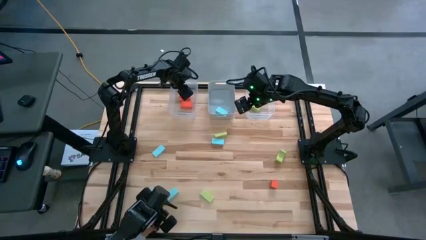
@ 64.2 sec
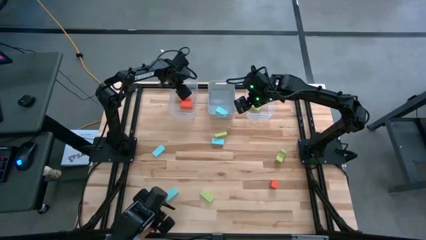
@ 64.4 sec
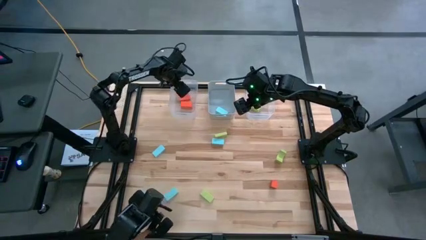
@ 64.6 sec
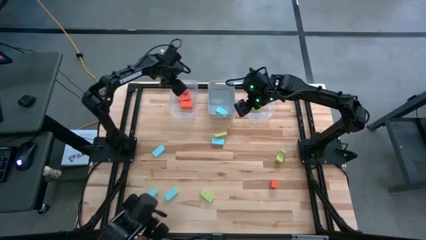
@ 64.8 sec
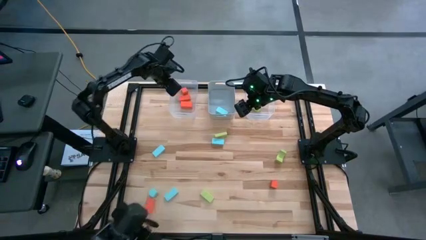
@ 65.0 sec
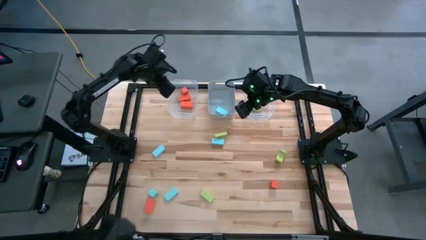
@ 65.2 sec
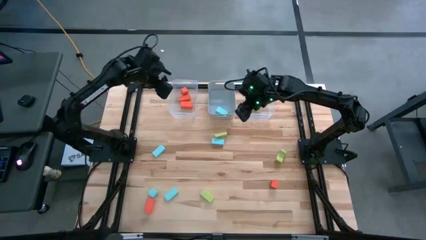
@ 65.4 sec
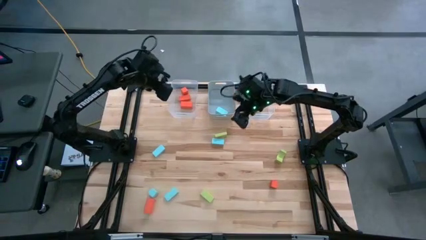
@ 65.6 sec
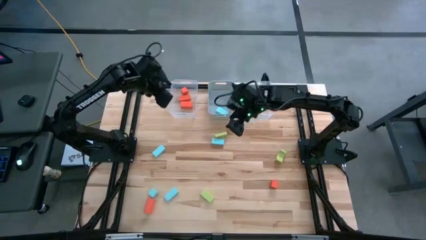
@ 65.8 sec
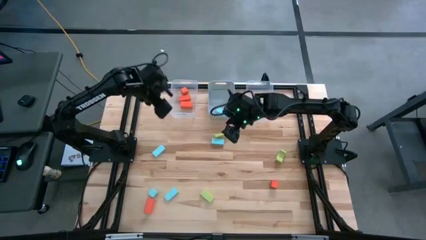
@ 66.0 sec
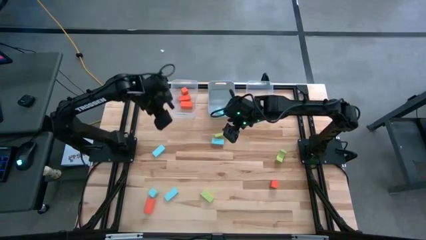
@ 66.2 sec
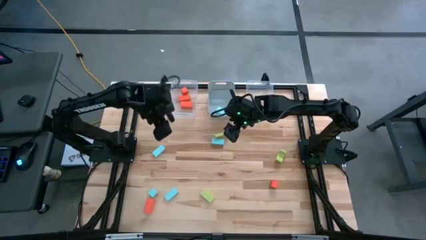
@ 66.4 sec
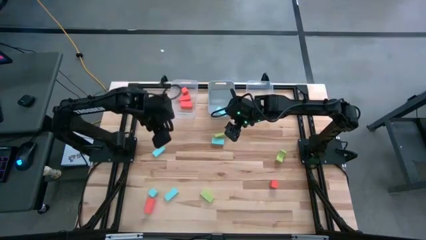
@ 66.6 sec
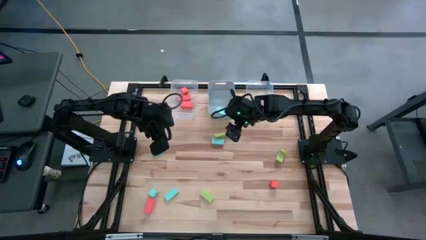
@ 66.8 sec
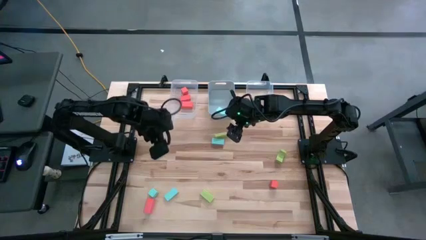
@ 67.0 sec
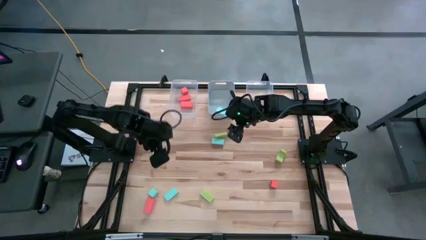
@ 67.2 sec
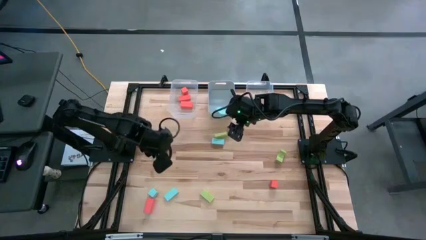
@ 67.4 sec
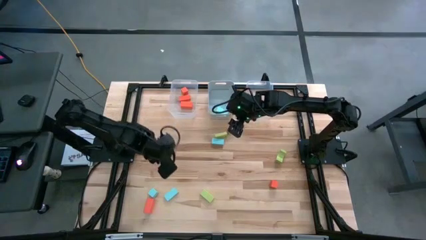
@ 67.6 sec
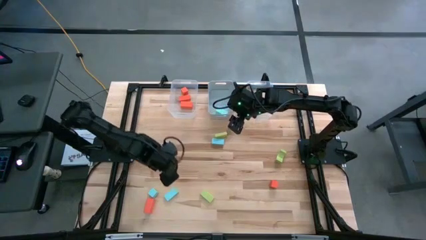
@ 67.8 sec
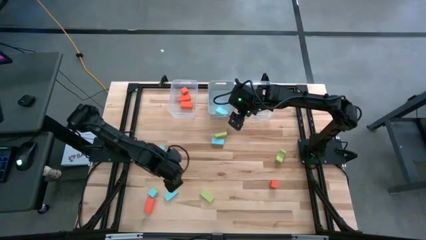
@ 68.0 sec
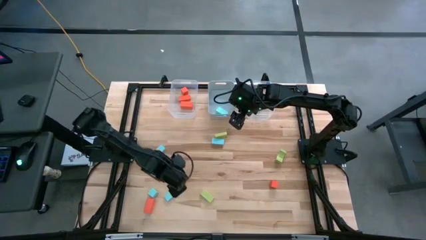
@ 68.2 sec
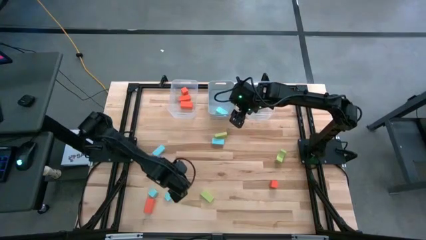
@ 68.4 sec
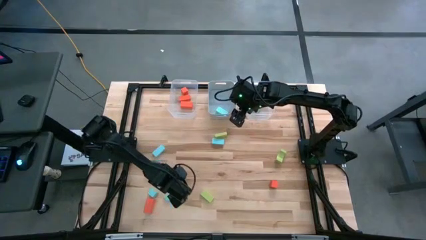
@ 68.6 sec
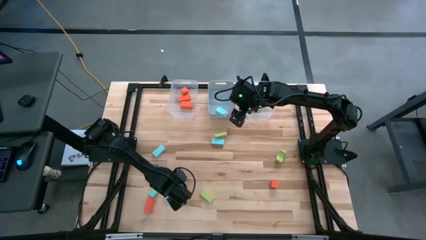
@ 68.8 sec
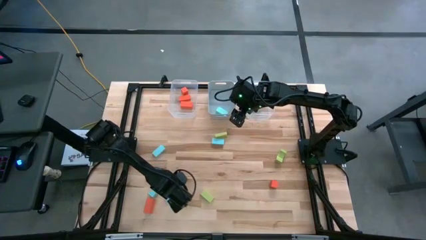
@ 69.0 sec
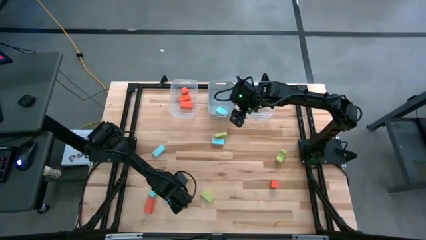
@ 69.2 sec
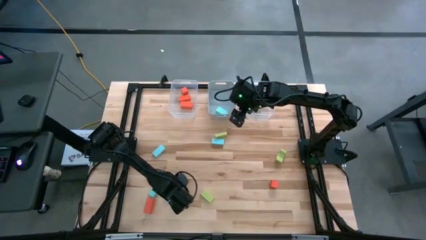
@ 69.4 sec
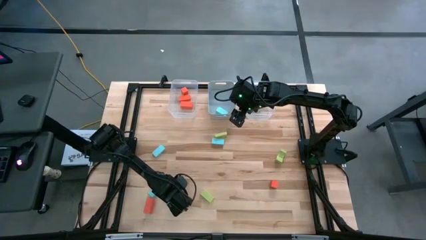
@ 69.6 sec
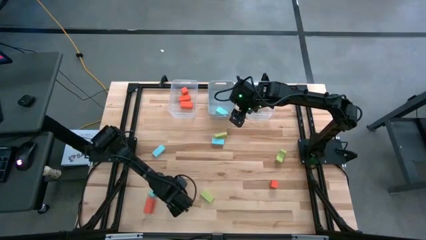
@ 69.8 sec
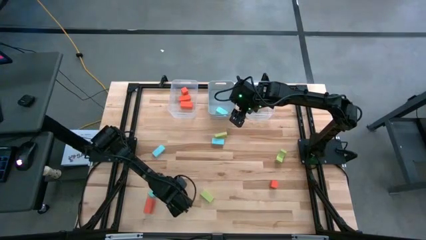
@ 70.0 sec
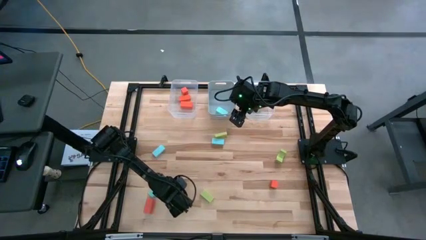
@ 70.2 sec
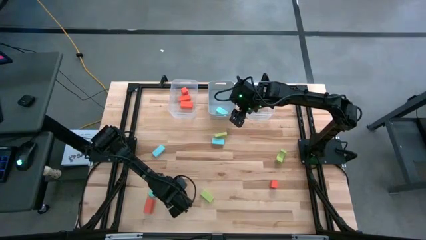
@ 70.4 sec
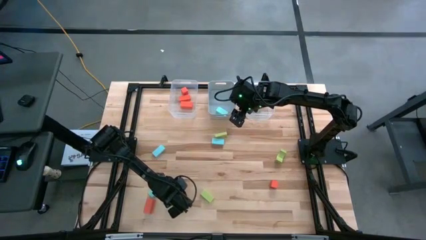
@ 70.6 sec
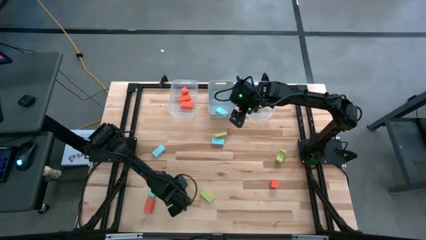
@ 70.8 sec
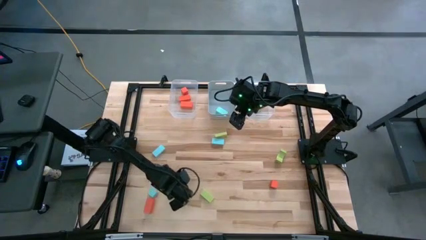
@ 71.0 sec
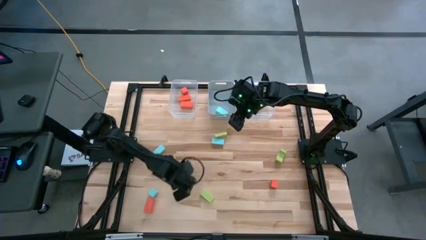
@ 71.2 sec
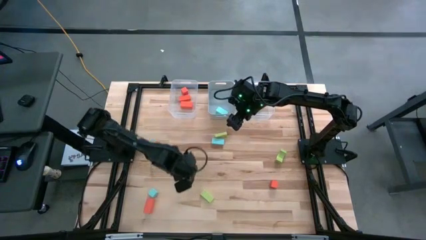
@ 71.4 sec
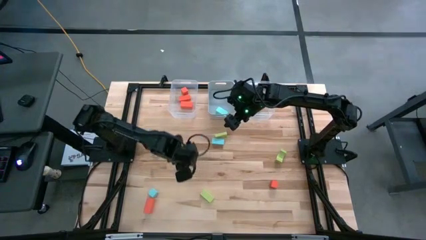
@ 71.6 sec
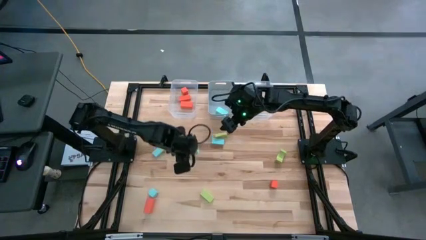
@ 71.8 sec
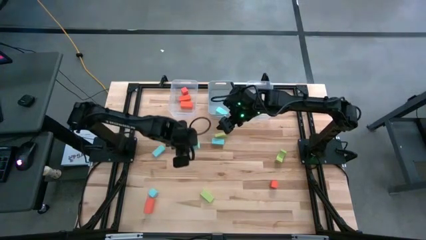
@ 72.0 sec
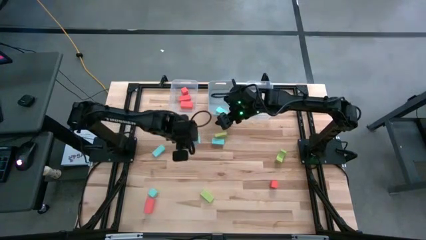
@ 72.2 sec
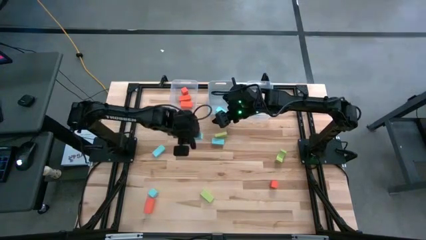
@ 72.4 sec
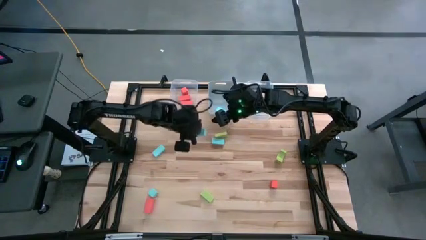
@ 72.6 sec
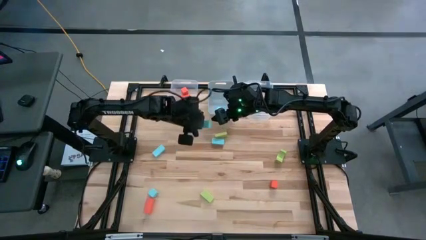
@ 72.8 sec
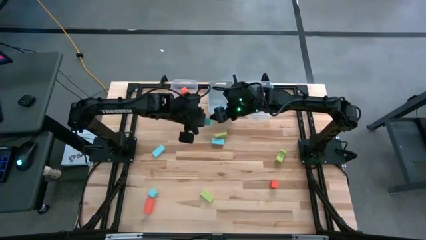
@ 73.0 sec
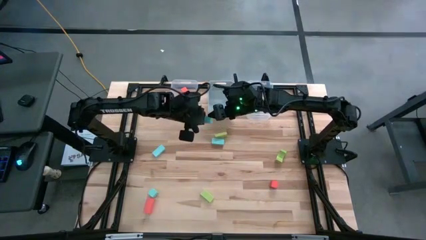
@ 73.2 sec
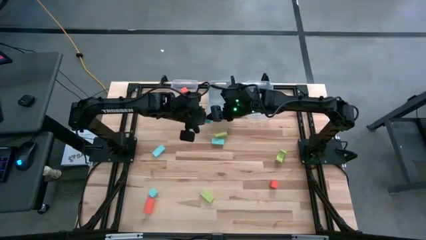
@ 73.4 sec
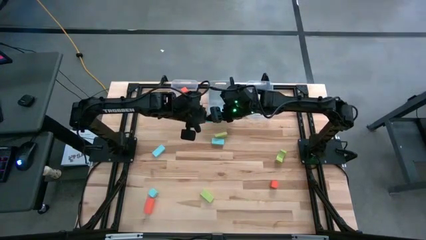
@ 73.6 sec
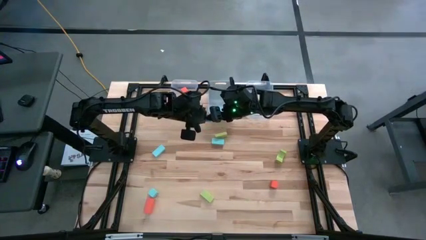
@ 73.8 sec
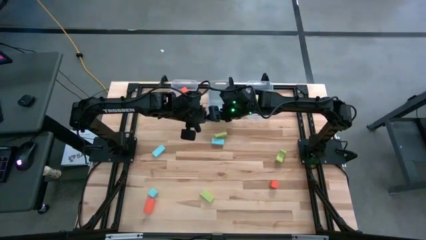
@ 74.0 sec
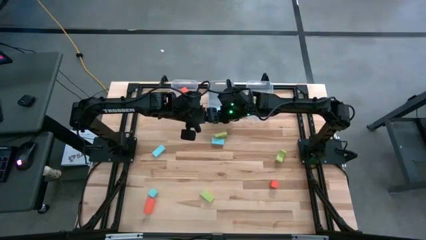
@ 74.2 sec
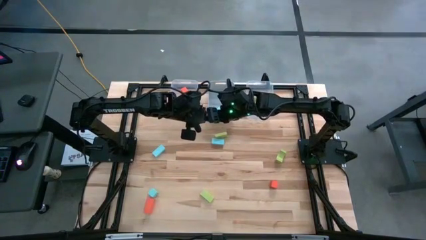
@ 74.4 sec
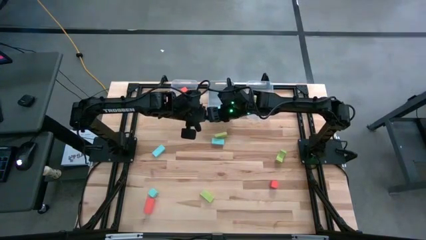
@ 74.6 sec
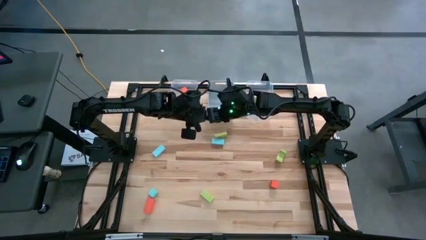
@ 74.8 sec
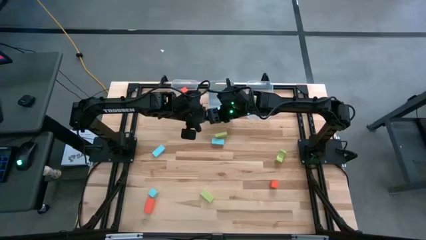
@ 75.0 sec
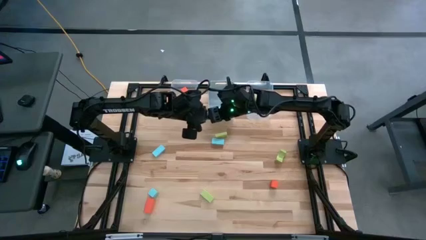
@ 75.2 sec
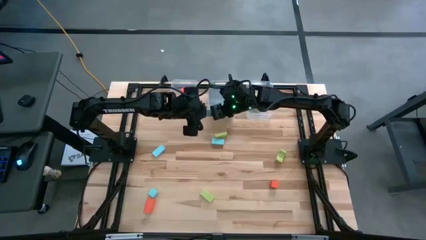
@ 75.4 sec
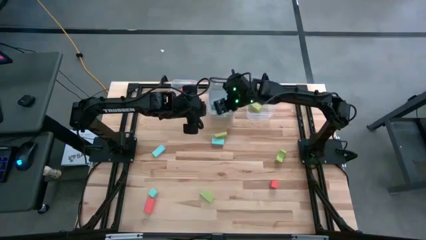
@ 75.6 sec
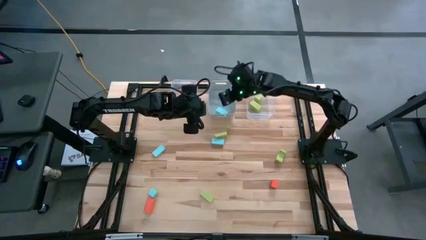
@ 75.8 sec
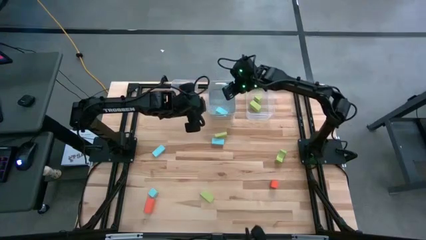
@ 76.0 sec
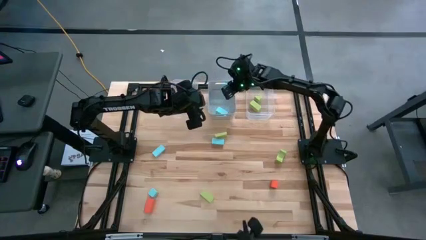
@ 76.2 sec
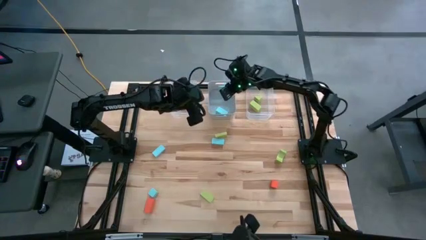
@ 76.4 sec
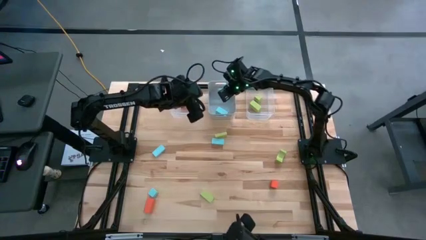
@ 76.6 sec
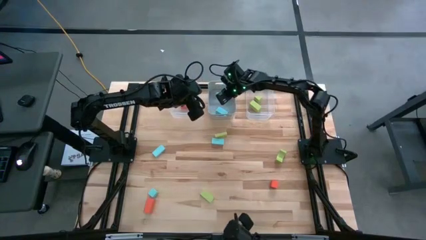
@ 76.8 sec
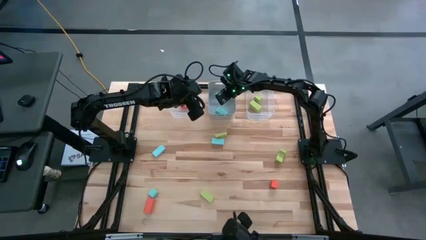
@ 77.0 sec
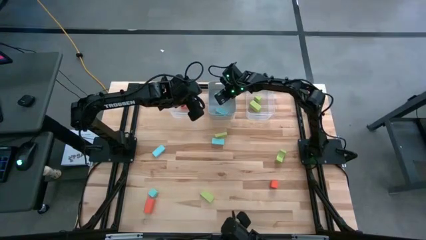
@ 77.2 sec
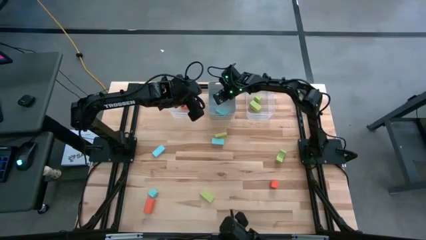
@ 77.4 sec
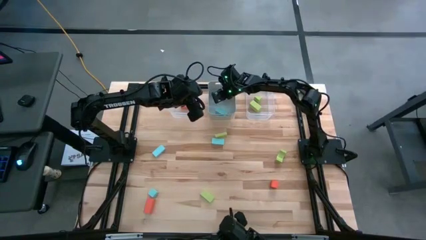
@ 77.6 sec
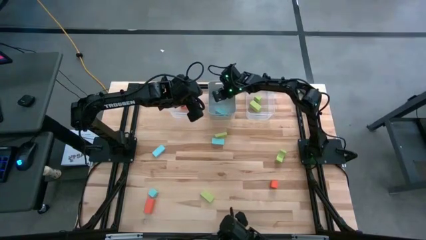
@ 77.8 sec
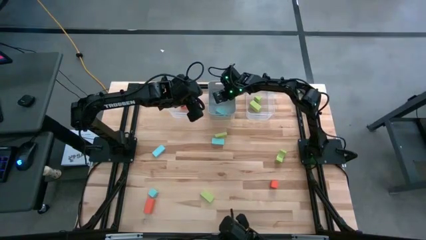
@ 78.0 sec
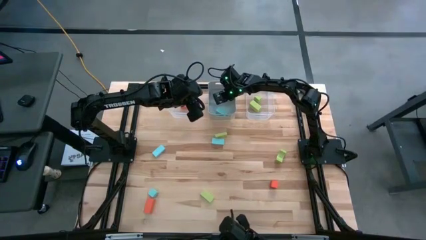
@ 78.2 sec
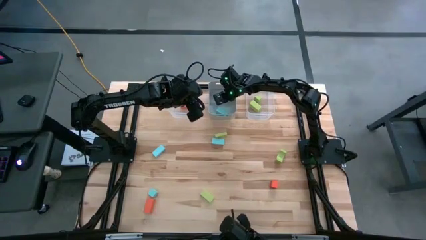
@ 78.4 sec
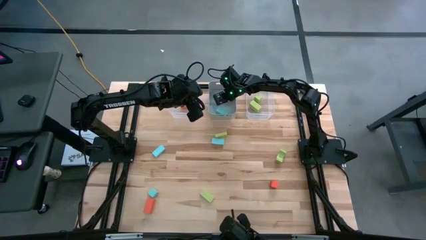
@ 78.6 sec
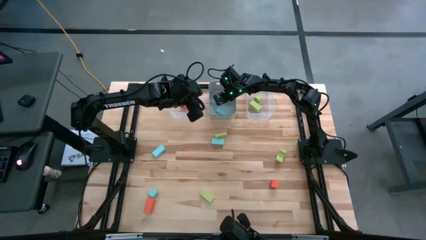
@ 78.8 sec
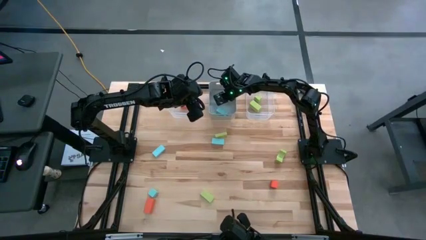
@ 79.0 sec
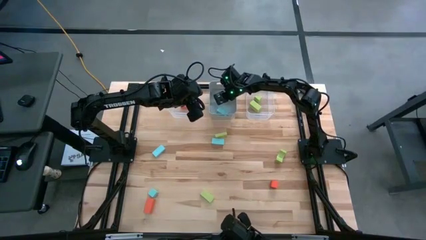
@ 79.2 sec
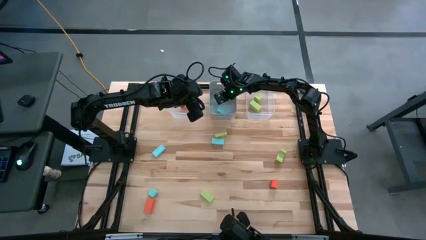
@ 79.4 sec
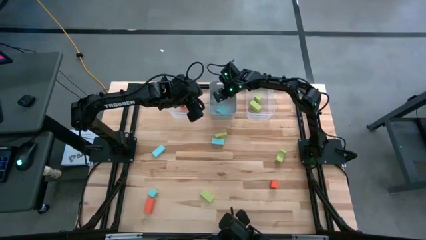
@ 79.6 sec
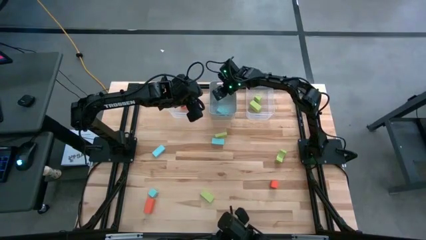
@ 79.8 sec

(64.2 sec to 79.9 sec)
Task: Sort & place blocks by color
Put the blue block into the grey bin
